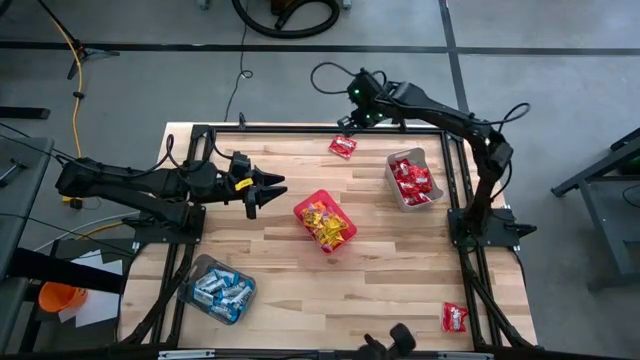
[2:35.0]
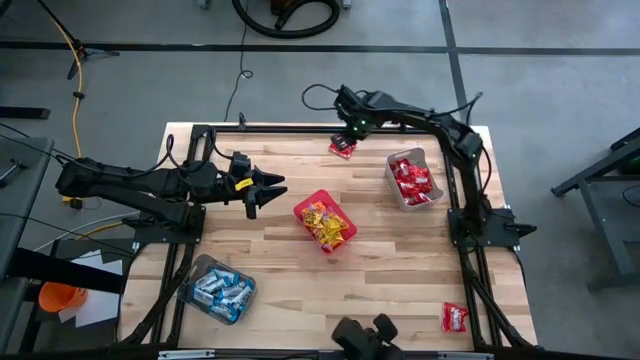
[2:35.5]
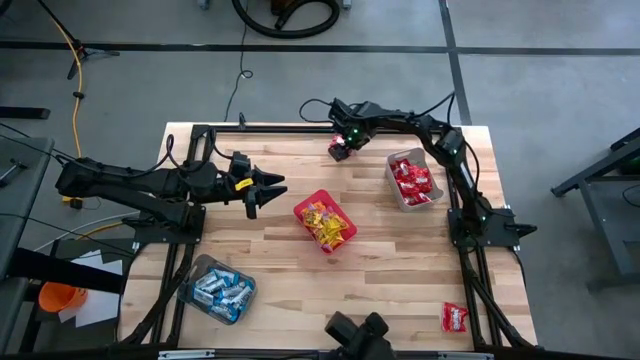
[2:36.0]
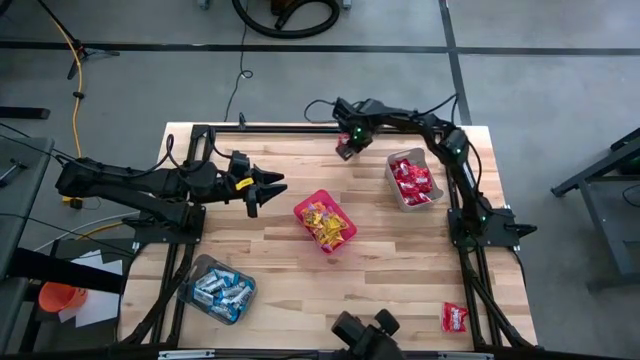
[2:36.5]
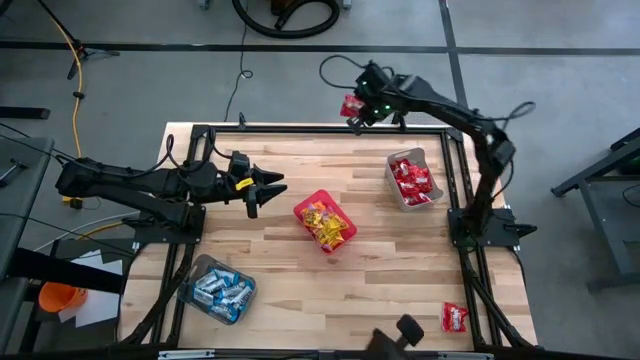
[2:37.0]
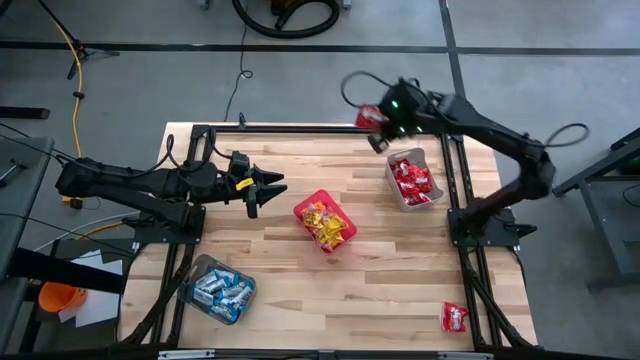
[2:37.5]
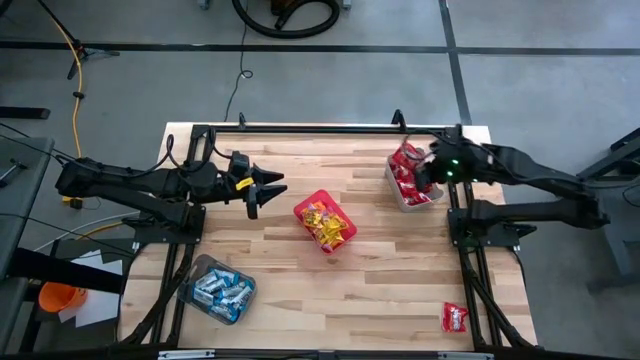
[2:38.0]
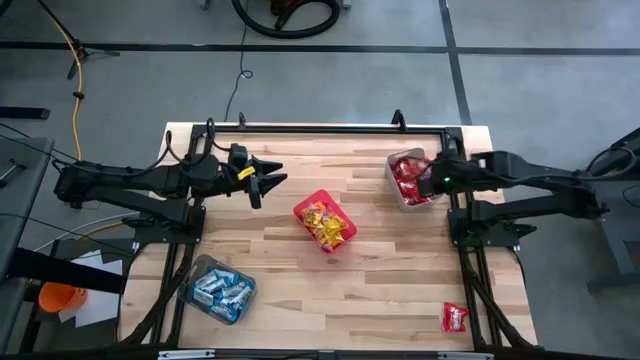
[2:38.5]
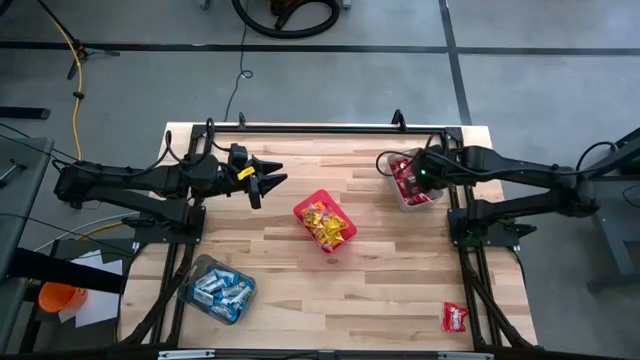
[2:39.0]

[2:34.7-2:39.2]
Task: Sort candy
Put the red candy into the gray bin

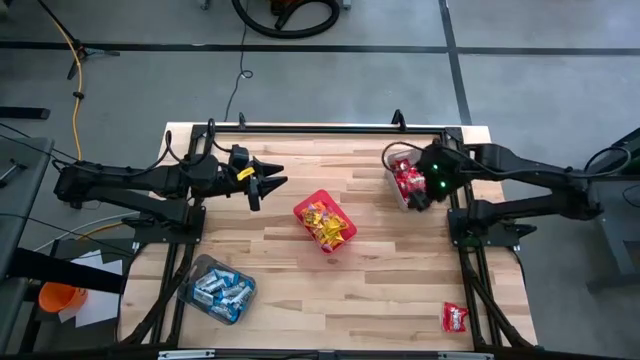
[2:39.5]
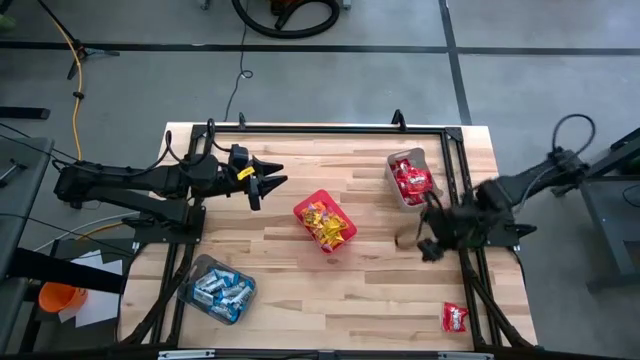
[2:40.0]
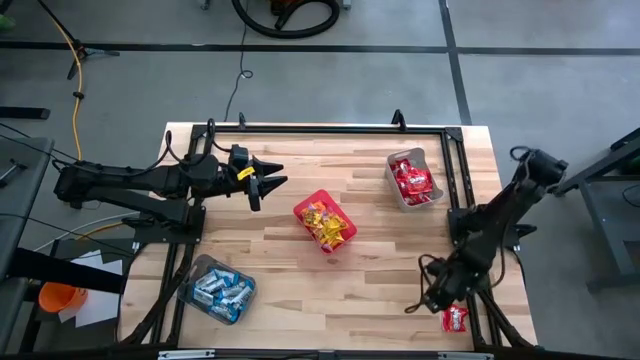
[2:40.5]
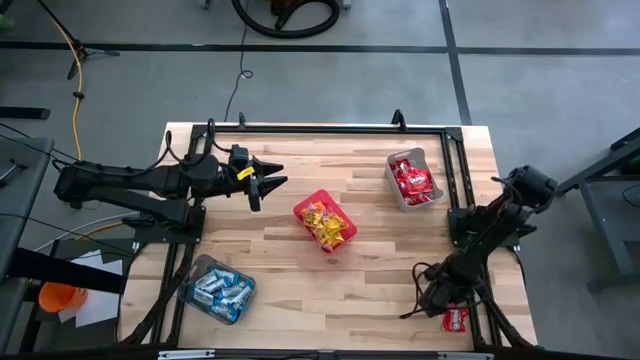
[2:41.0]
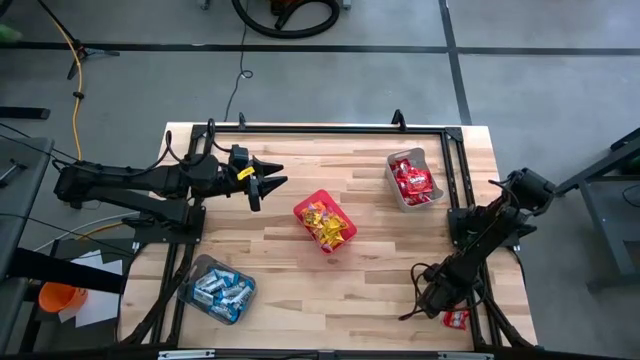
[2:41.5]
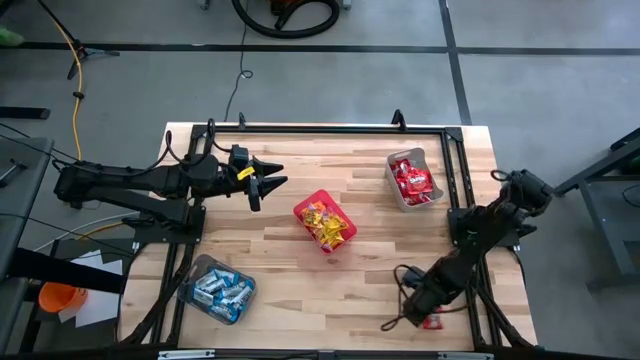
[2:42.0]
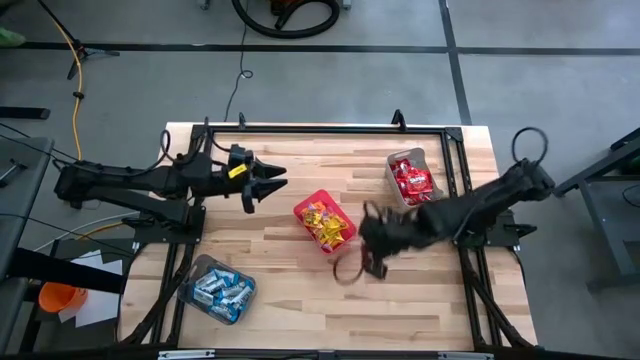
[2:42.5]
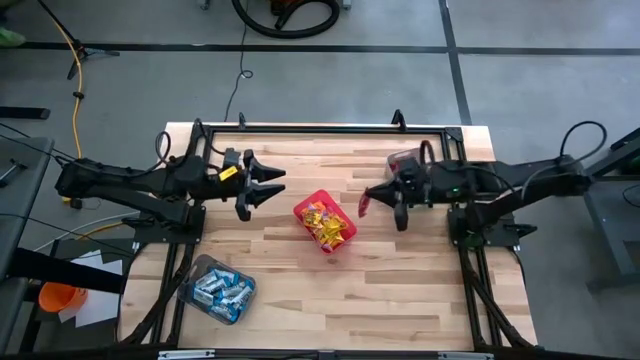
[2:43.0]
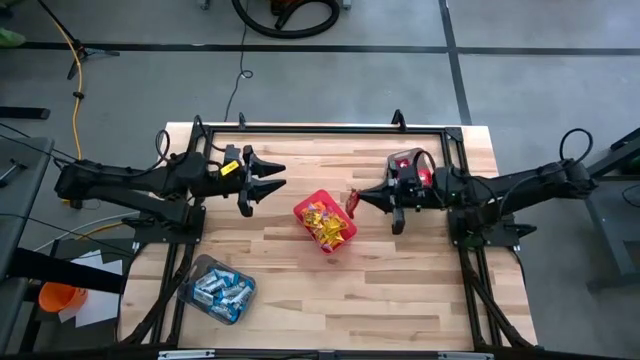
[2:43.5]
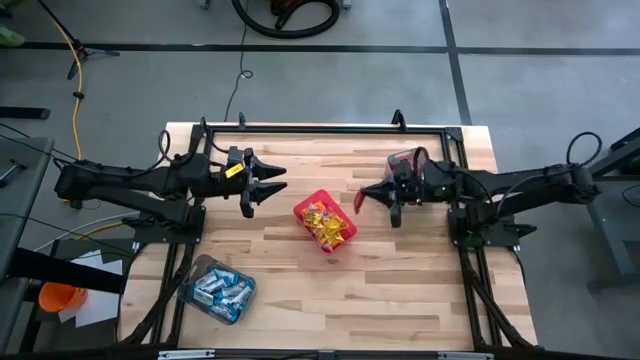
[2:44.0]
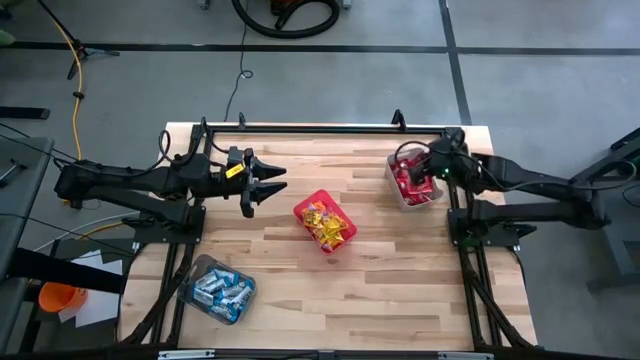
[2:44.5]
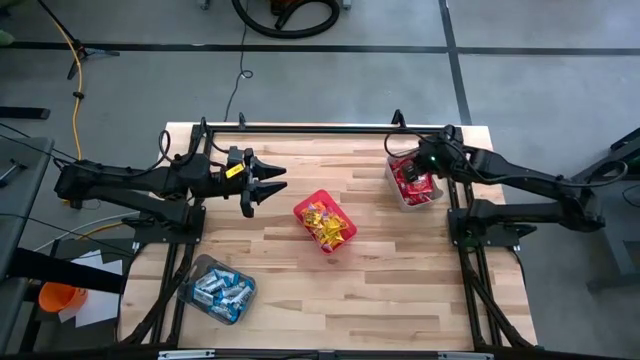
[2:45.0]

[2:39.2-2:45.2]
Put the red candy into the gray bin

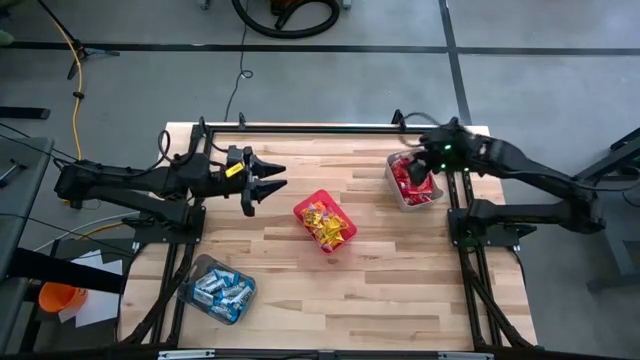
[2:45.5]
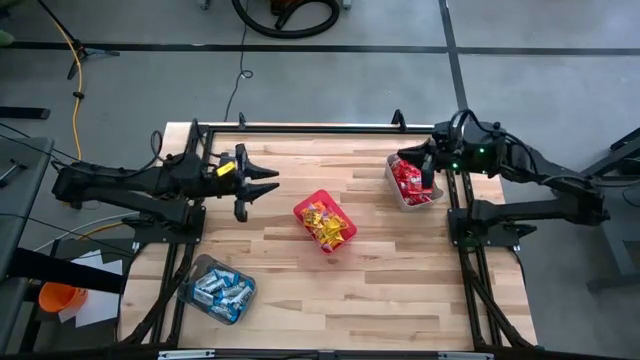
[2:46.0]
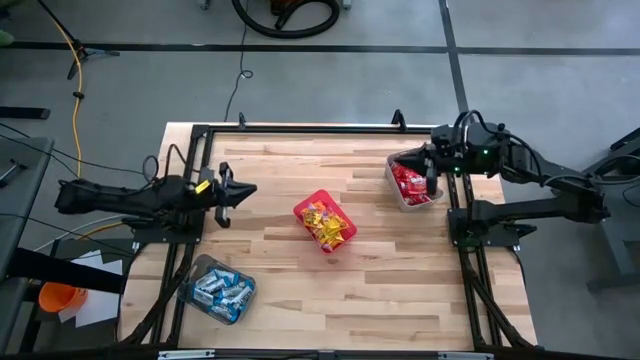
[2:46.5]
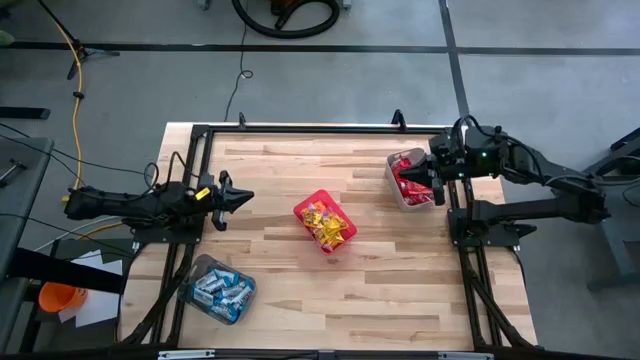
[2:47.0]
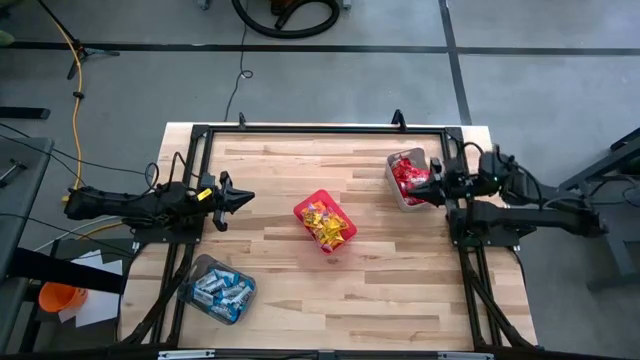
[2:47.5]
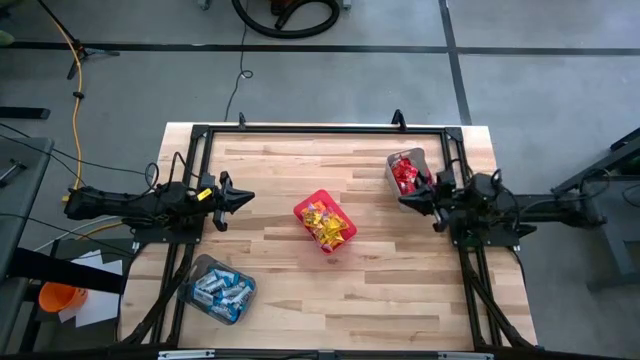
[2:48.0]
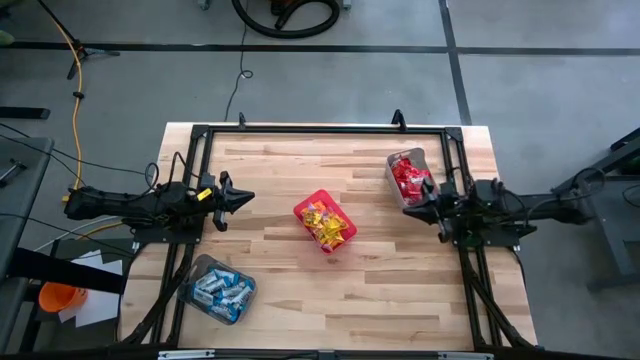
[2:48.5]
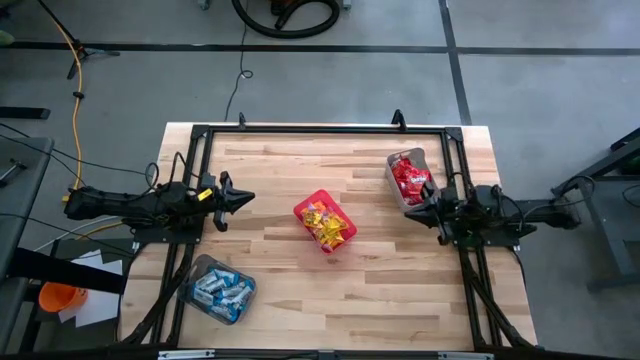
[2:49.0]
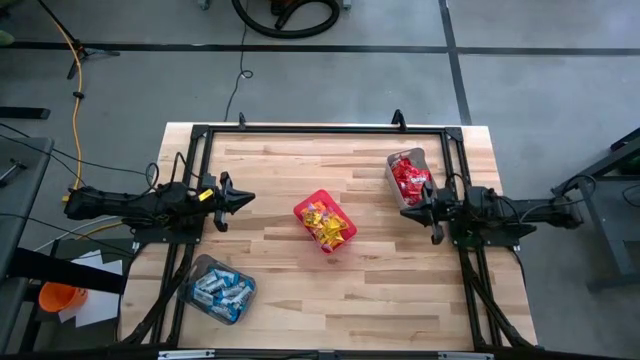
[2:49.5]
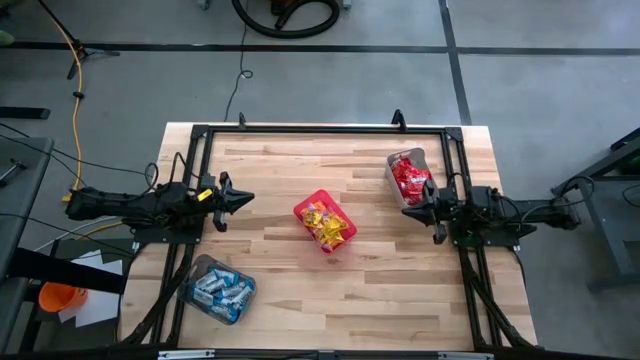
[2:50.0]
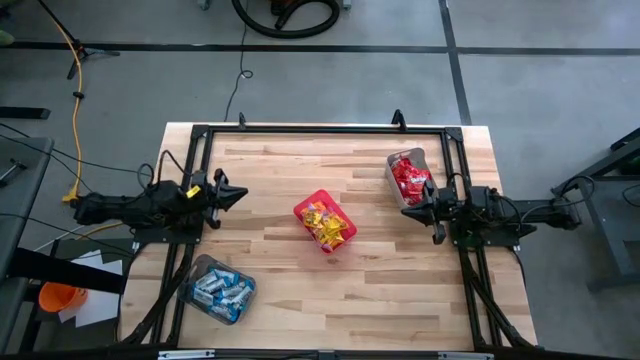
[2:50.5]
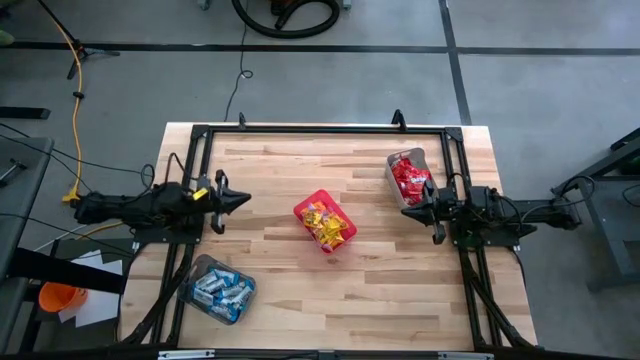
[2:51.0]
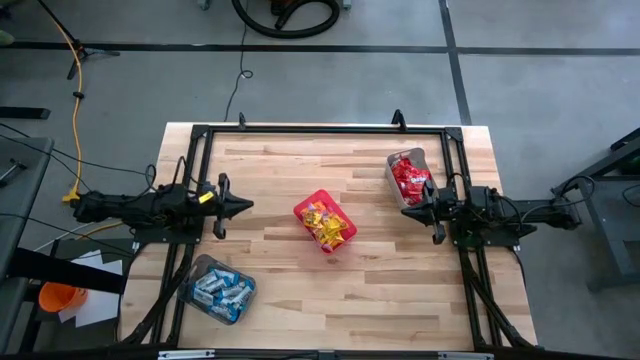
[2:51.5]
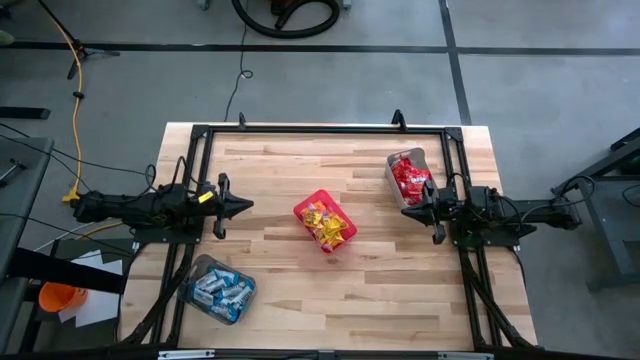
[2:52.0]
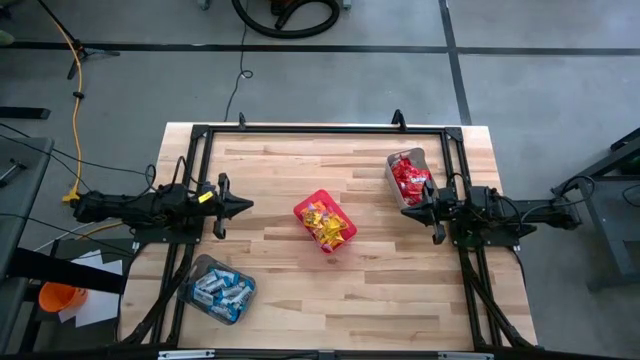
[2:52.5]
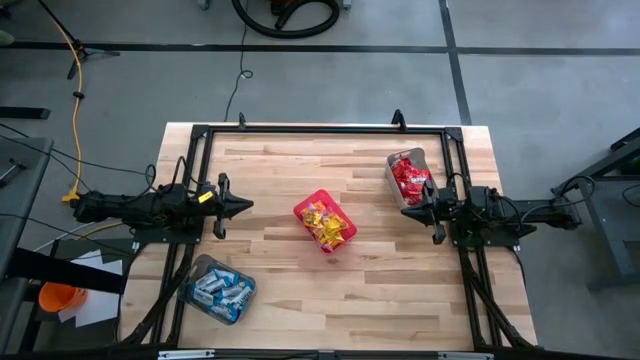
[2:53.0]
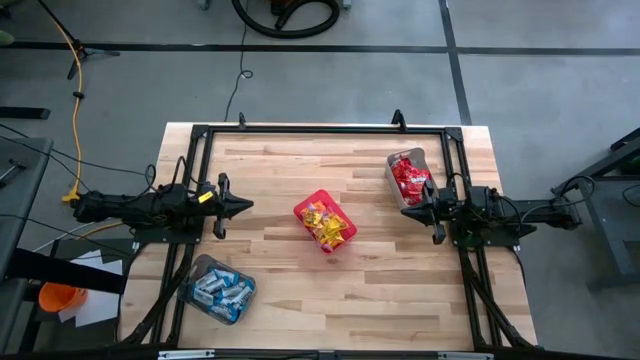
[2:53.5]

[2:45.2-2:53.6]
Return to Home Position

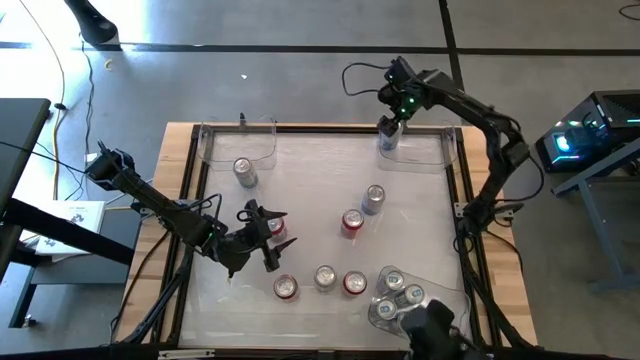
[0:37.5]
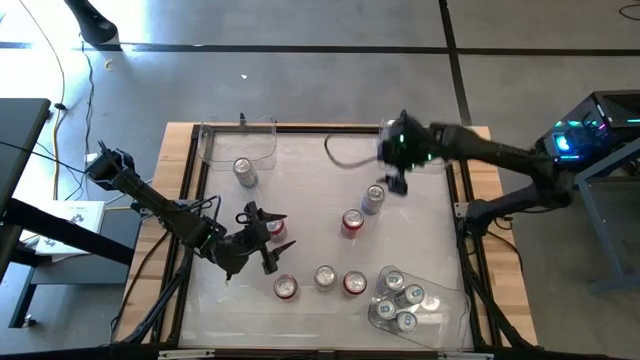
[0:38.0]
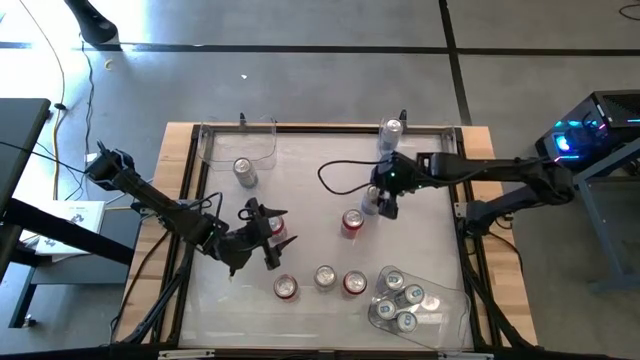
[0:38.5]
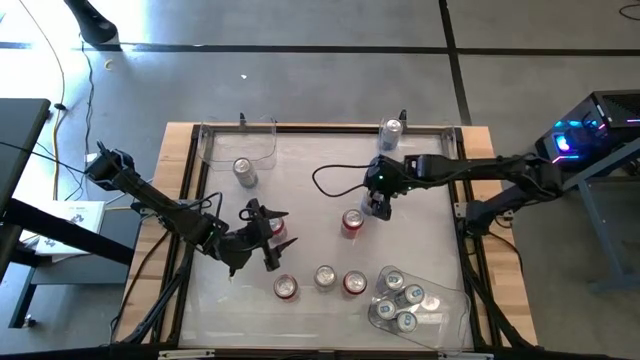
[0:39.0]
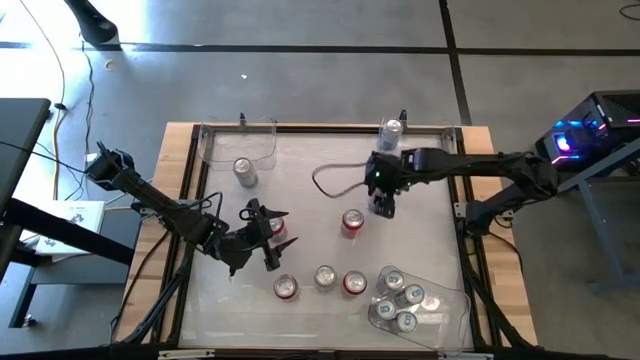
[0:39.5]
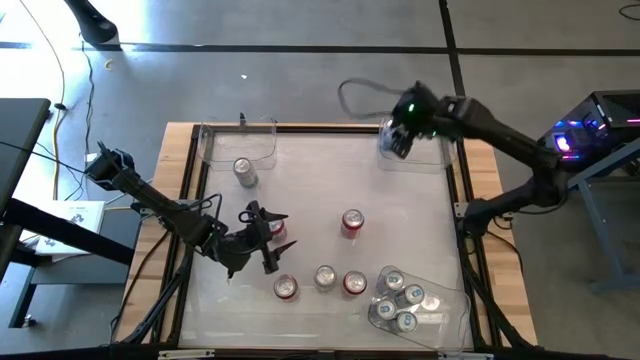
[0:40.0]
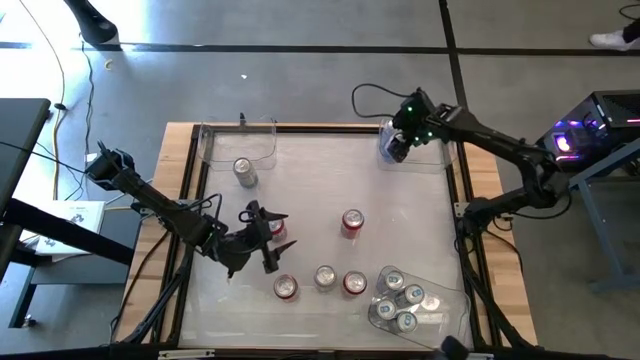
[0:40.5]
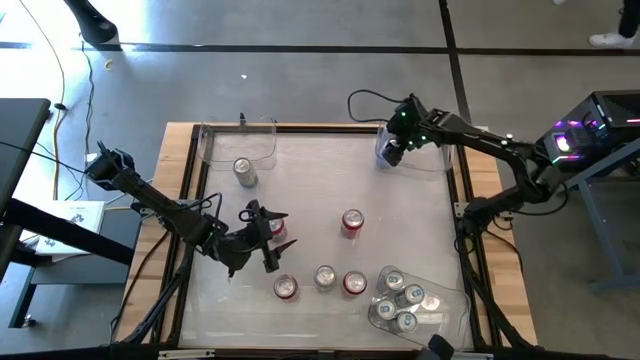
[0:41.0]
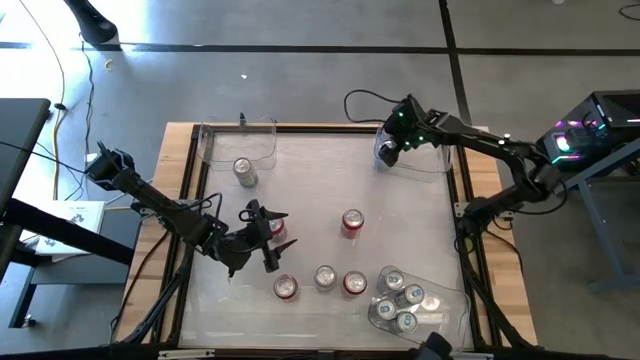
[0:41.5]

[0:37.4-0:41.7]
Task: Sort soda cans
Put the blue white soda can into the top right transparent bin
